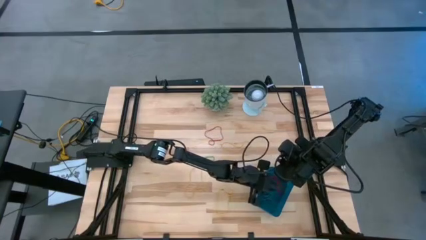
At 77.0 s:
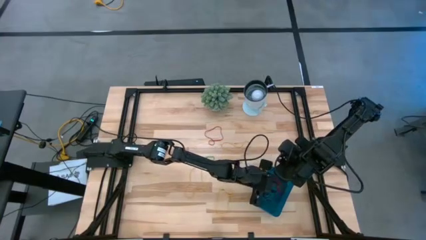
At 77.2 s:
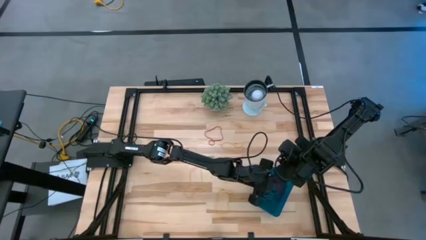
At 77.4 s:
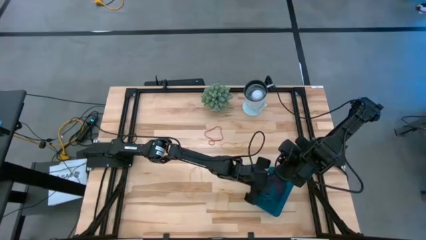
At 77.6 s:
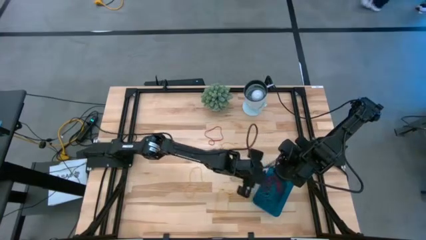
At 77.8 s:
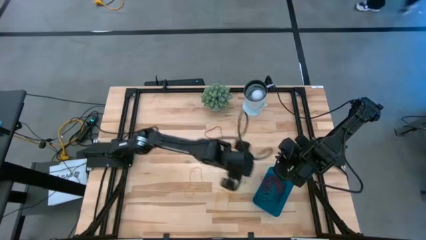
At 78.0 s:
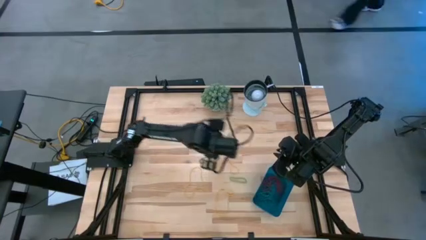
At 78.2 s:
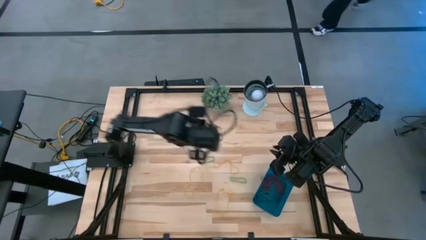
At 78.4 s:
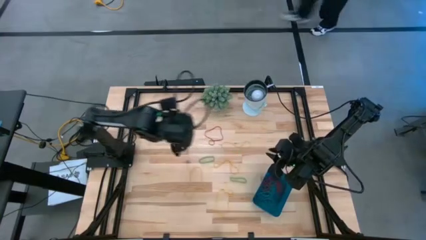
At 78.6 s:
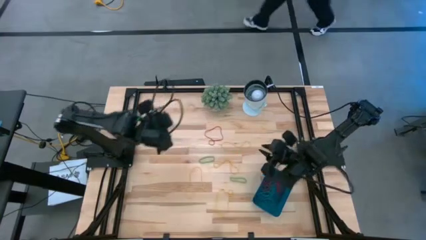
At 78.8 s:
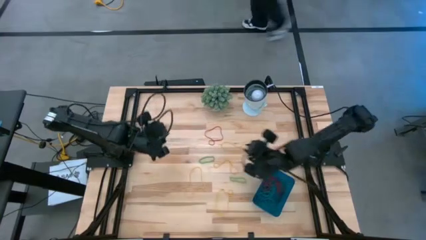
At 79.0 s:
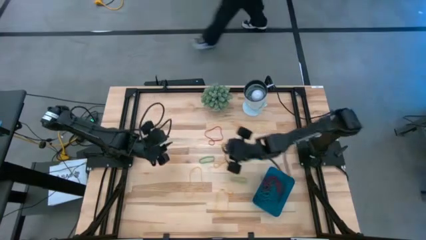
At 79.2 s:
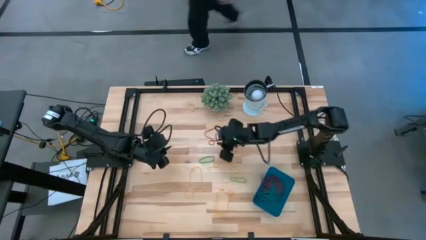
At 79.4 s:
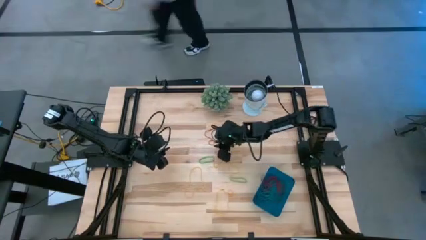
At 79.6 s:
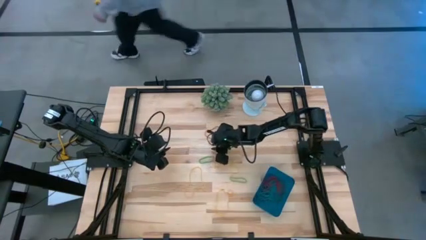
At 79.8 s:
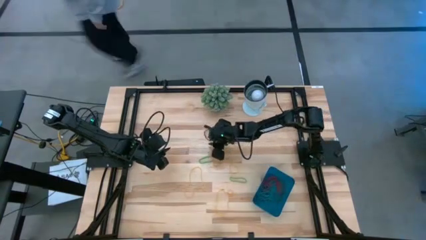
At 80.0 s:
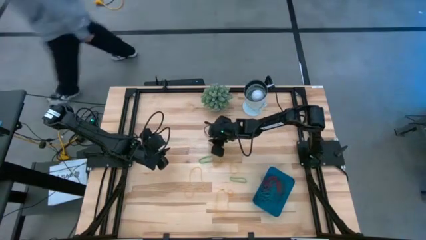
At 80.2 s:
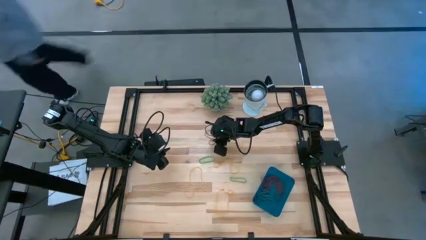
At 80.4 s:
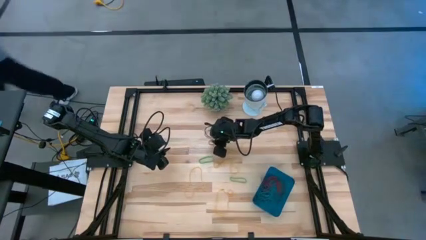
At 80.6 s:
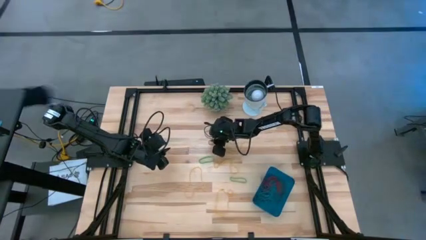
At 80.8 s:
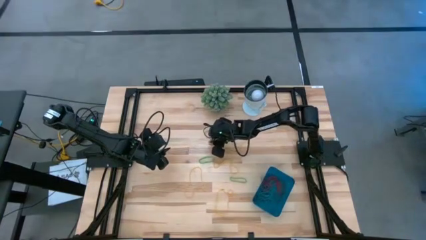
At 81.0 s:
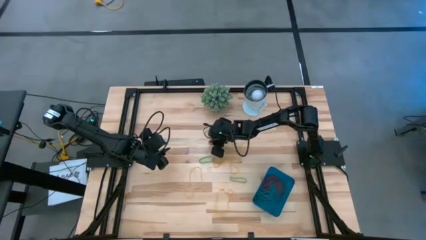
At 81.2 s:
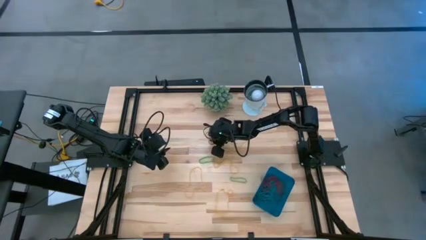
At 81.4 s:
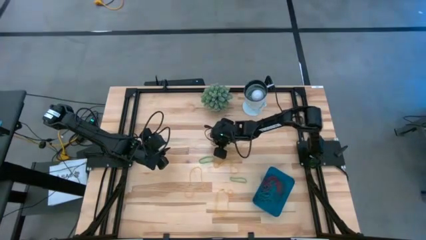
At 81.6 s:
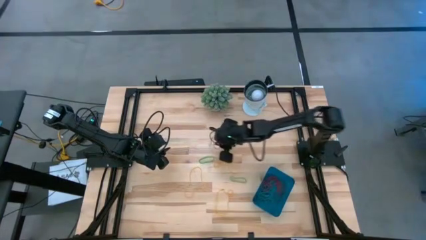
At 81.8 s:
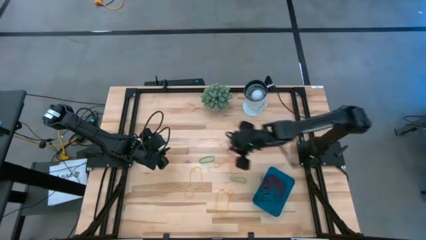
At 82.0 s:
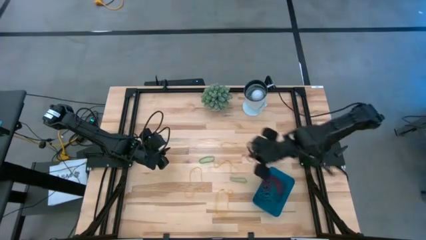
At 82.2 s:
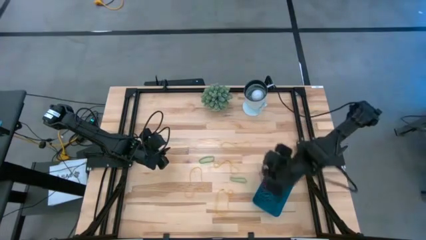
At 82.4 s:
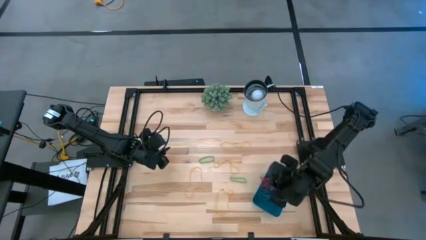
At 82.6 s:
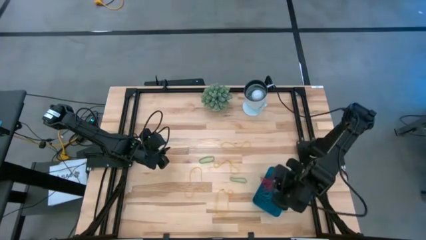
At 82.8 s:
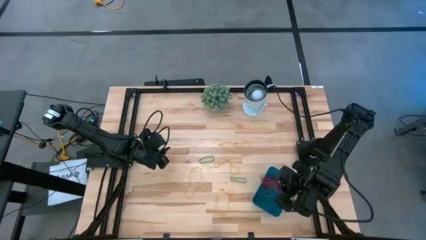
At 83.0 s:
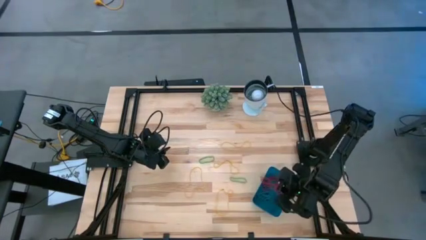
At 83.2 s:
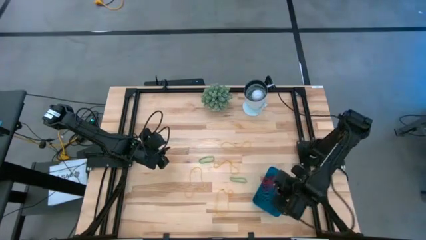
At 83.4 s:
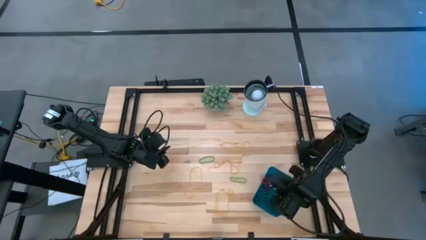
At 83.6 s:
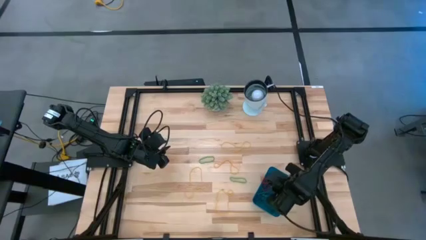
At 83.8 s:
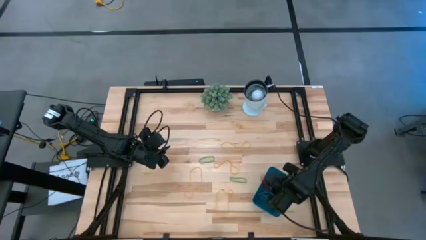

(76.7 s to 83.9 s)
Task: Pick and place items into bin
Put the red rubber band into the blue bin

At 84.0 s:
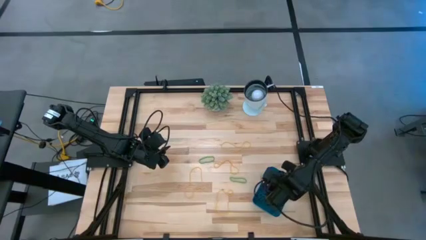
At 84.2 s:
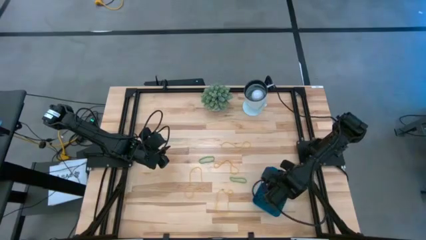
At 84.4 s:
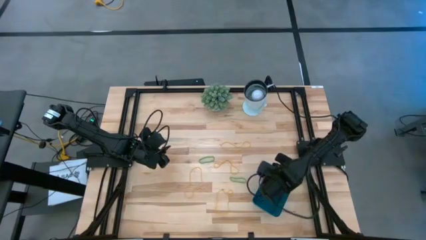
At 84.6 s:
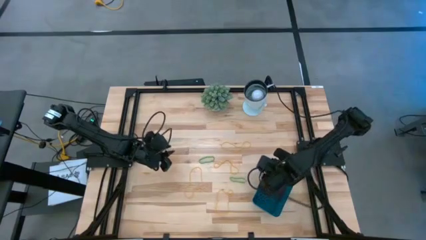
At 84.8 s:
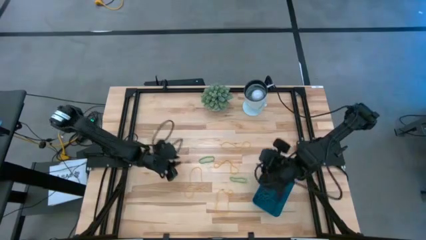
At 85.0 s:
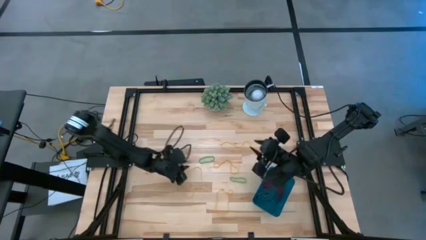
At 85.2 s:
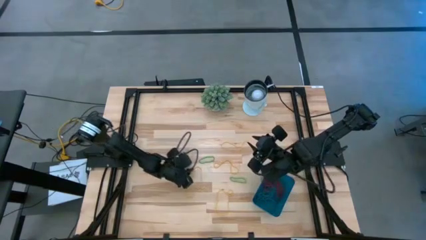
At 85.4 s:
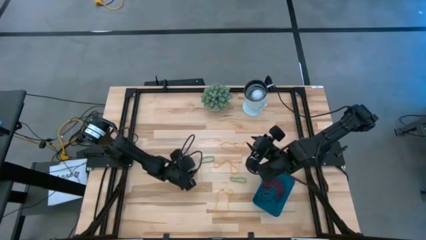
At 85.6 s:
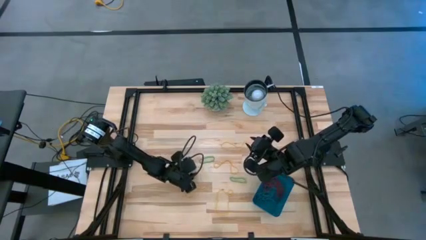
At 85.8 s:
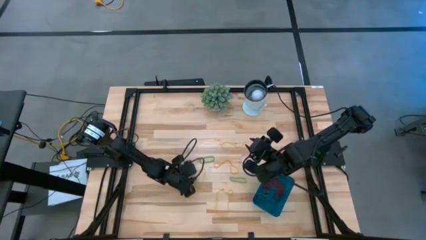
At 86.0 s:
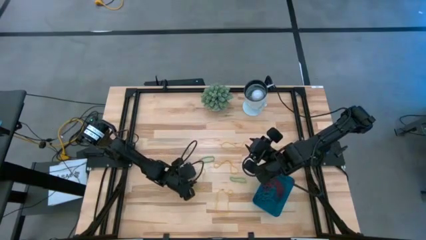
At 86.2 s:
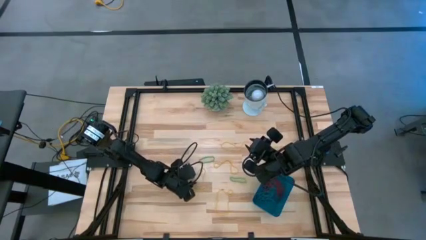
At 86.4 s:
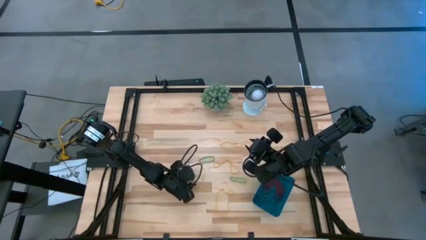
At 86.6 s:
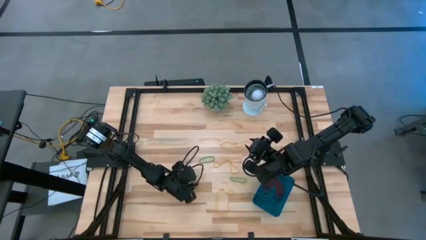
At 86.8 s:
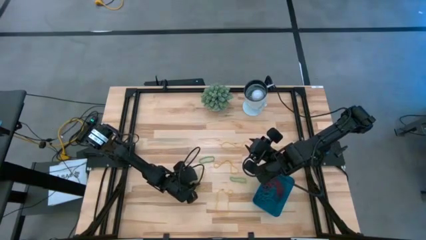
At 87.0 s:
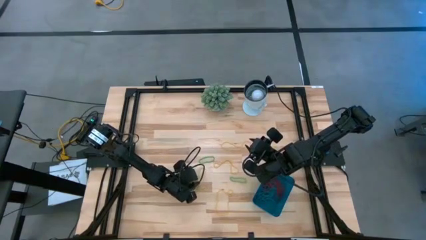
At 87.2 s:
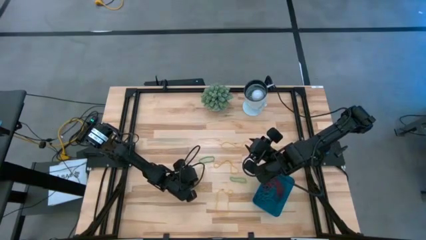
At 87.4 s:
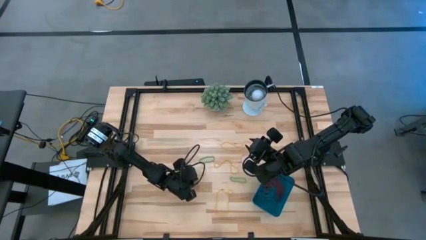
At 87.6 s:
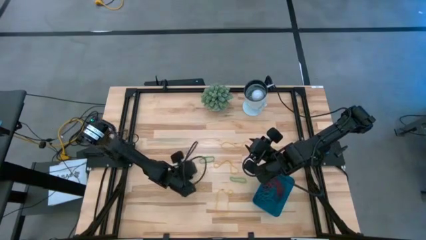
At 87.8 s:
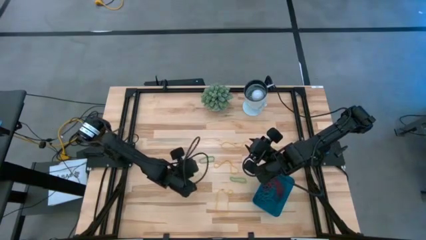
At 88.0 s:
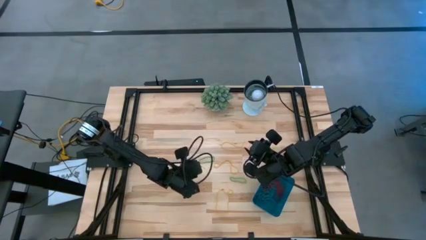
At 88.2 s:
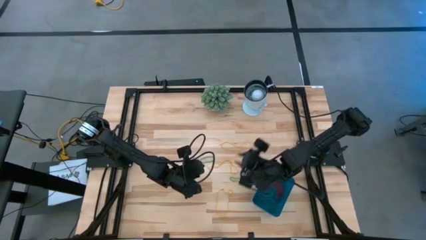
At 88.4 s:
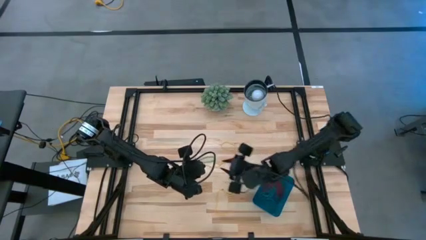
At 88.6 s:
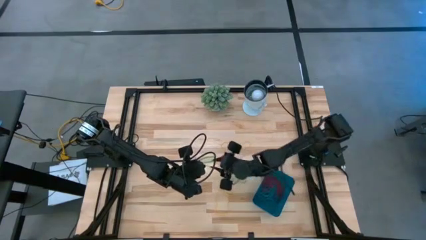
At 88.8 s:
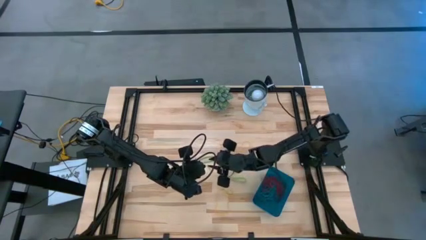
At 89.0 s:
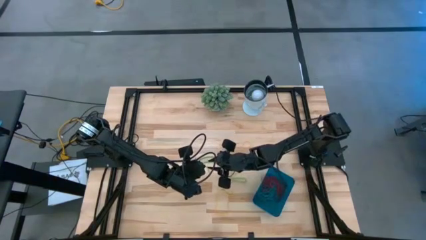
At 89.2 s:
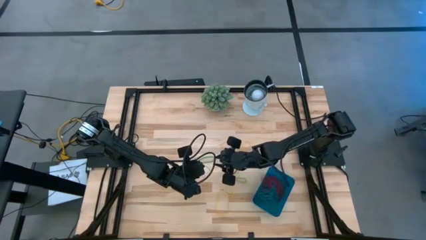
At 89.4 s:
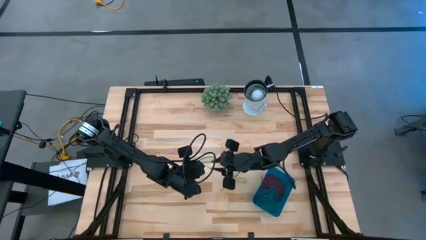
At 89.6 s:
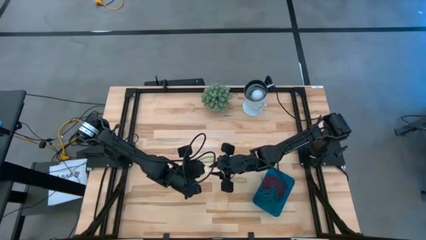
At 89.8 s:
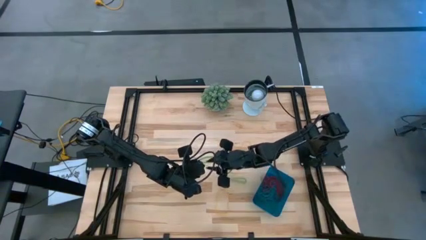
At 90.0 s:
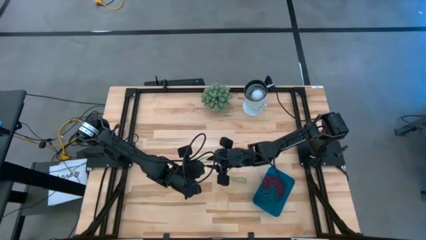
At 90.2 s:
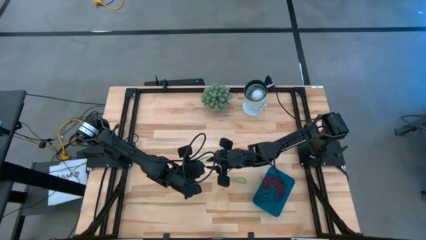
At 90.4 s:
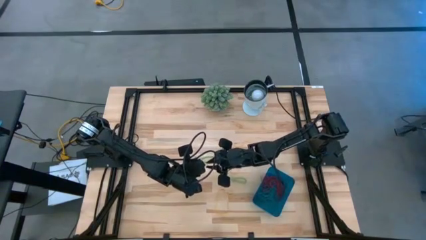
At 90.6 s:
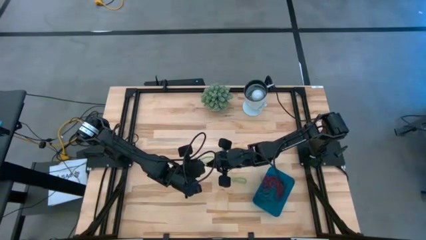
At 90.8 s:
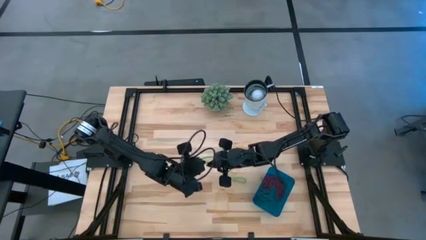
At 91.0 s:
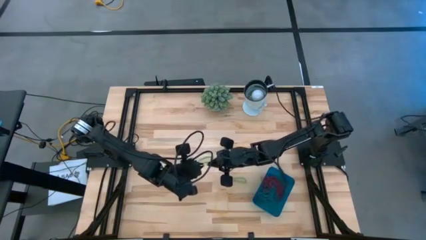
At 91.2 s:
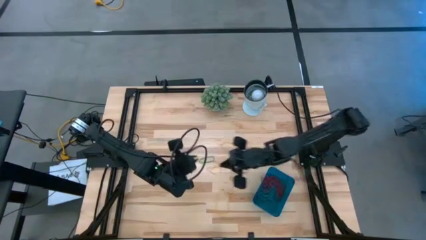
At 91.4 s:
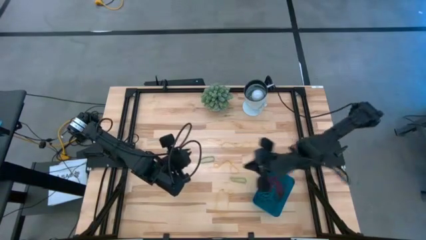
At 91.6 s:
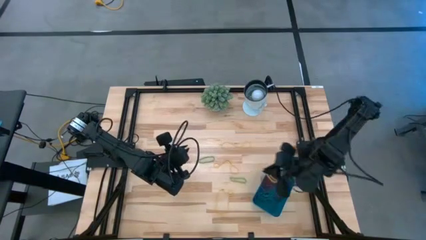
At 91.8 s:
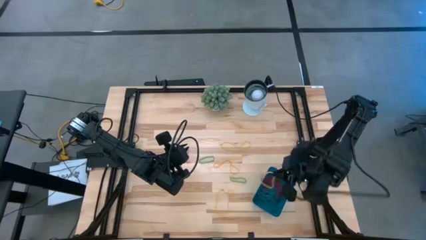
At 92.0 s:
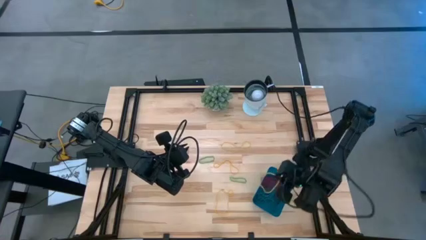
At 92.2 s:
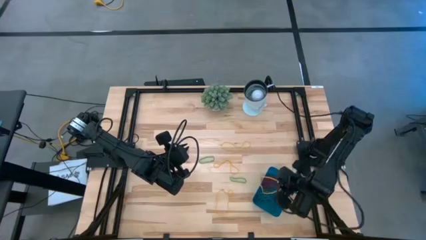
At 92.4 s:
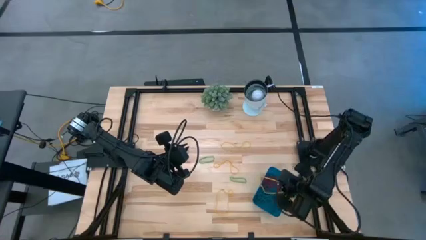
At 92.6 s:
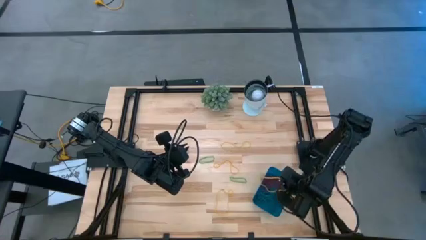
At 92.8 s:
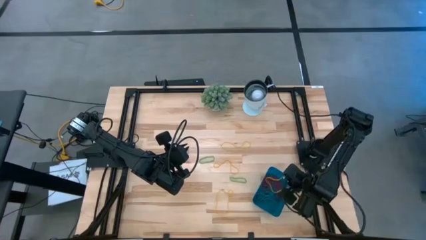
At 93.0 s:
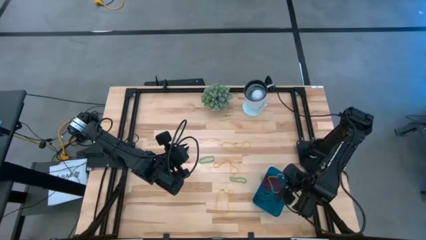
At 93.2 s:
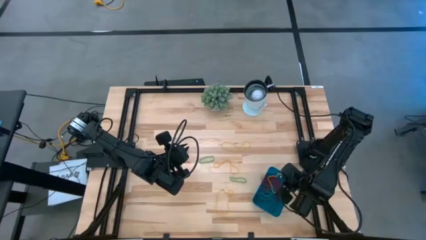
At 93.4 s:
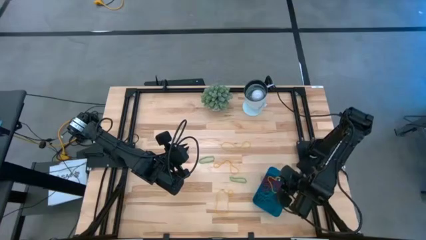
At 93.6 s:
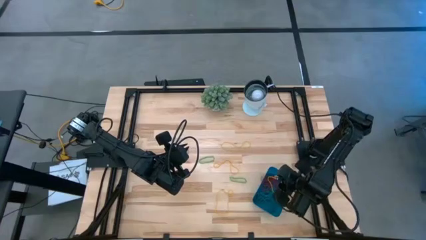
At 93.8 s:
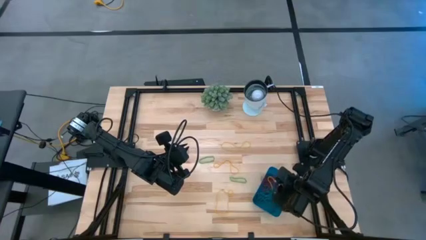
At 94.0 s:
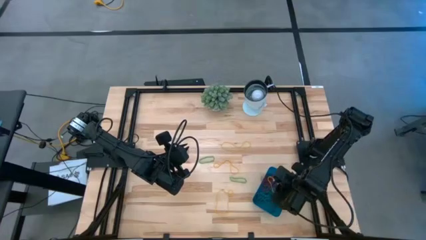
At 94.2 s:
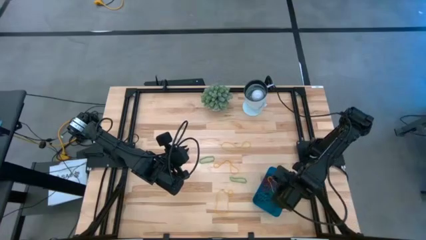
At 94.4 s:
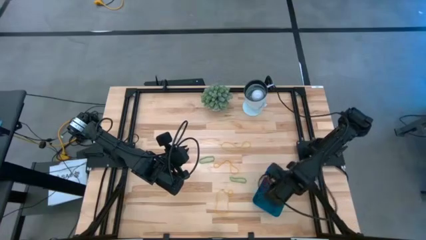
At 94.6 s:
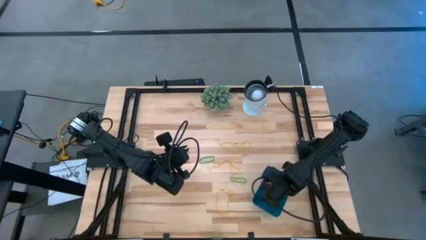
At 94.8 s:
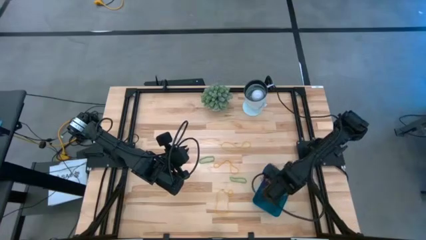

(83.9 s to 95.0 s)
Put the yellow rubber band into the blue bin
